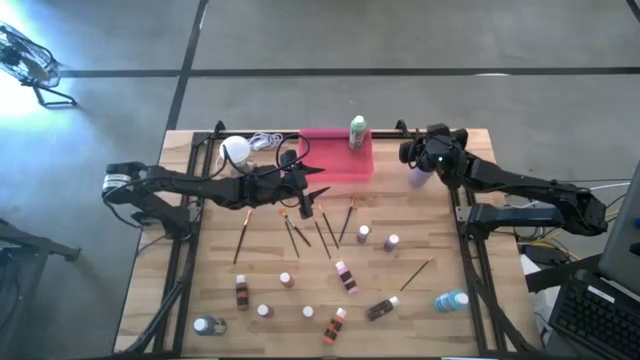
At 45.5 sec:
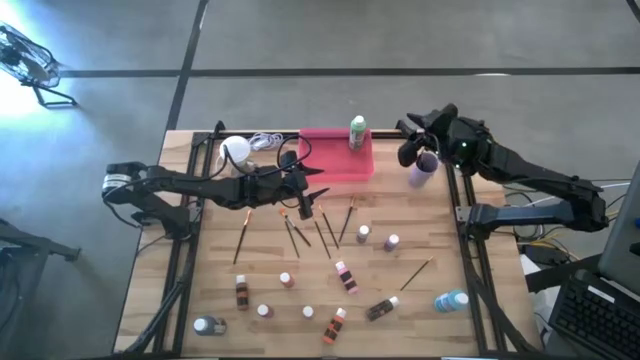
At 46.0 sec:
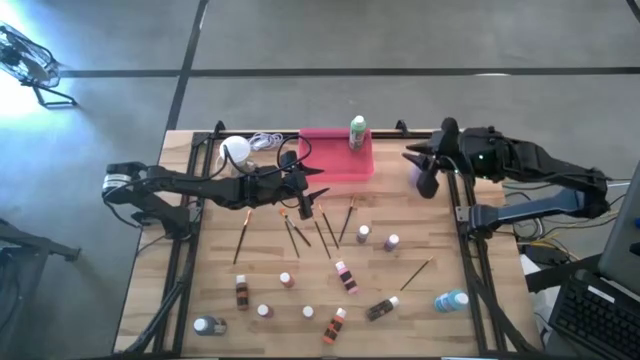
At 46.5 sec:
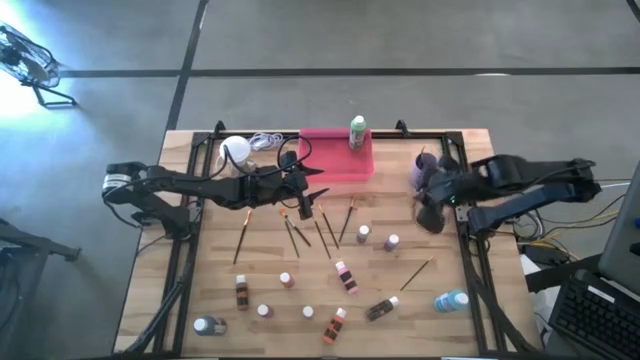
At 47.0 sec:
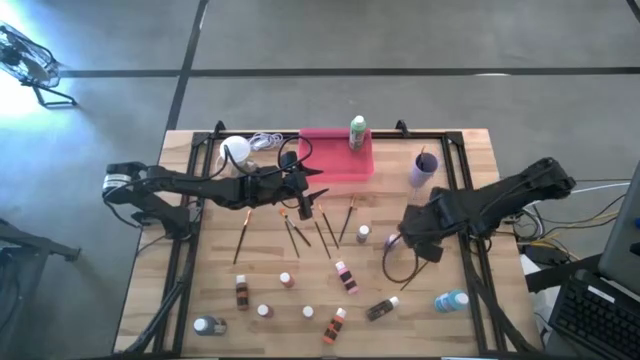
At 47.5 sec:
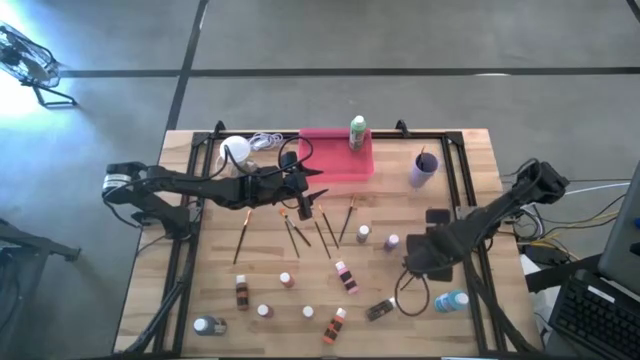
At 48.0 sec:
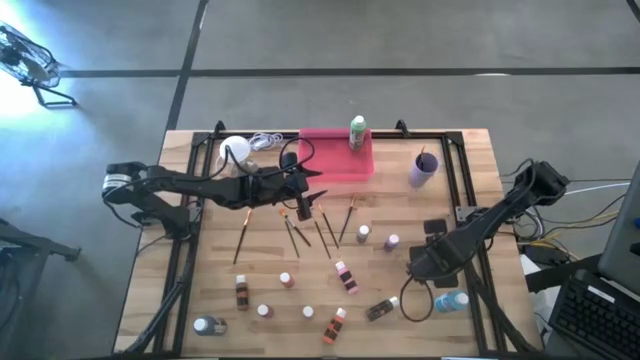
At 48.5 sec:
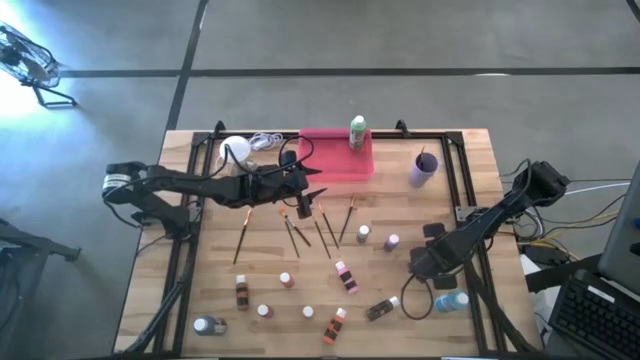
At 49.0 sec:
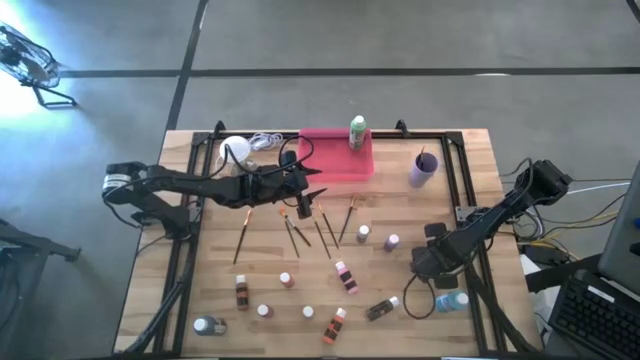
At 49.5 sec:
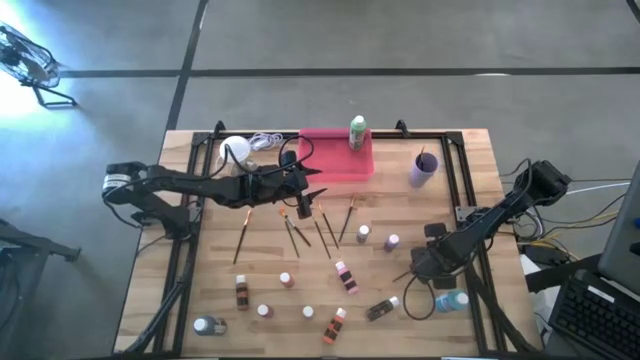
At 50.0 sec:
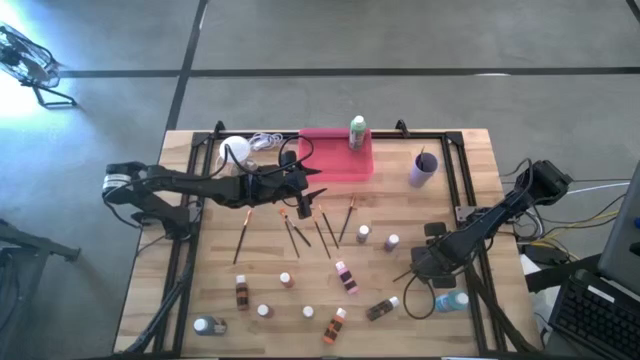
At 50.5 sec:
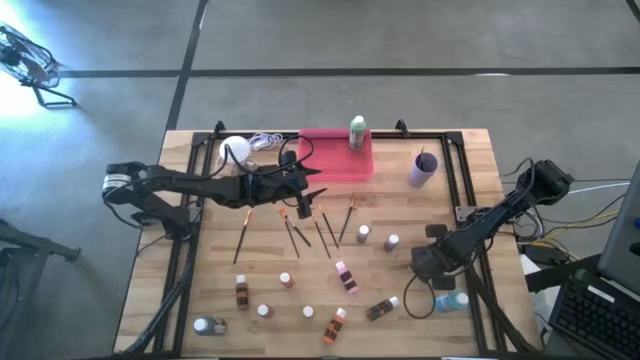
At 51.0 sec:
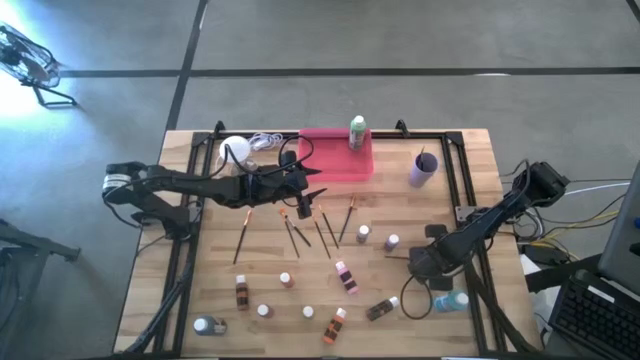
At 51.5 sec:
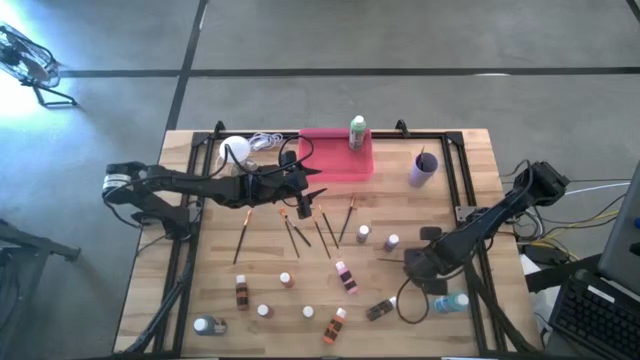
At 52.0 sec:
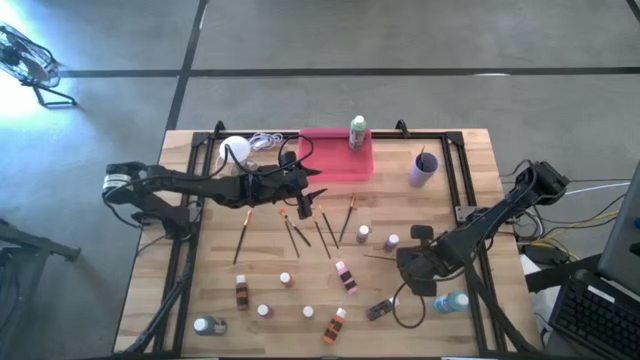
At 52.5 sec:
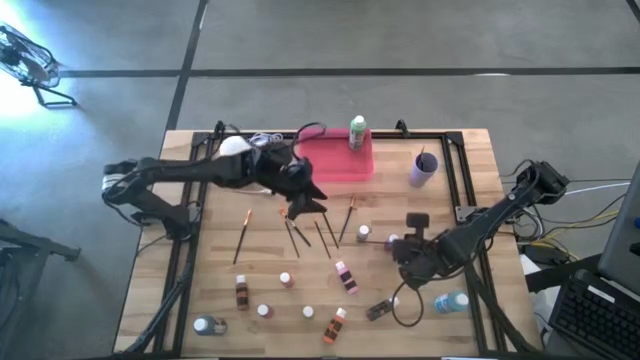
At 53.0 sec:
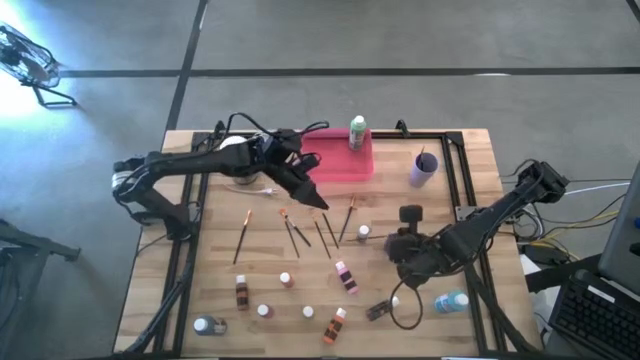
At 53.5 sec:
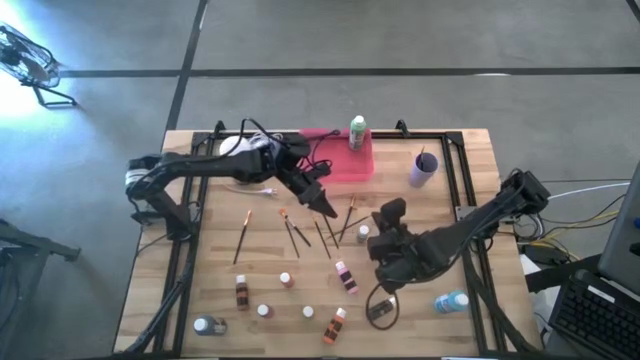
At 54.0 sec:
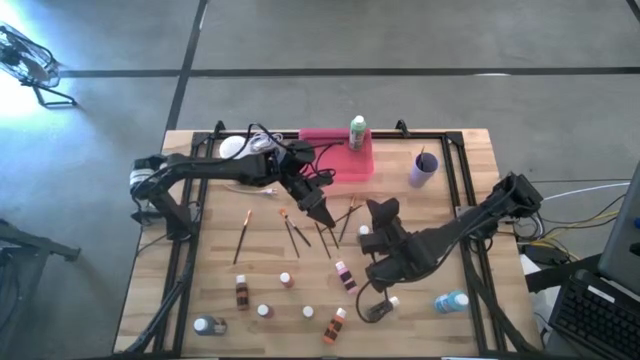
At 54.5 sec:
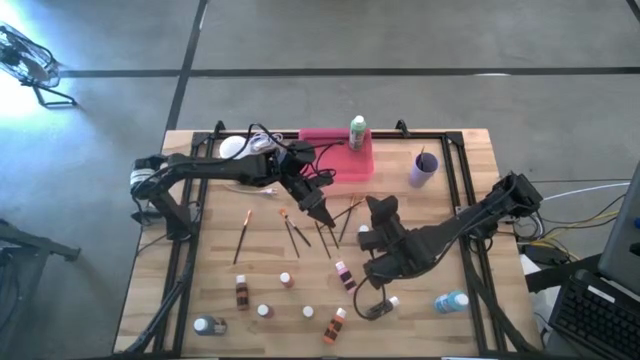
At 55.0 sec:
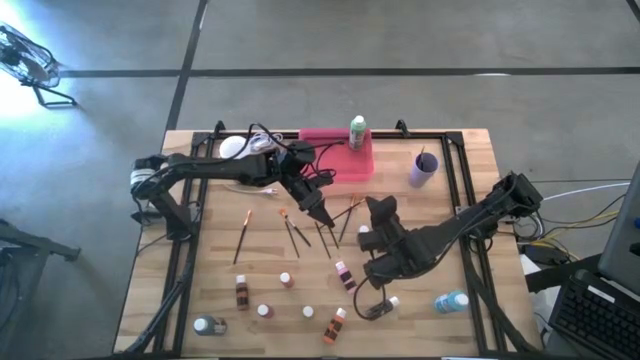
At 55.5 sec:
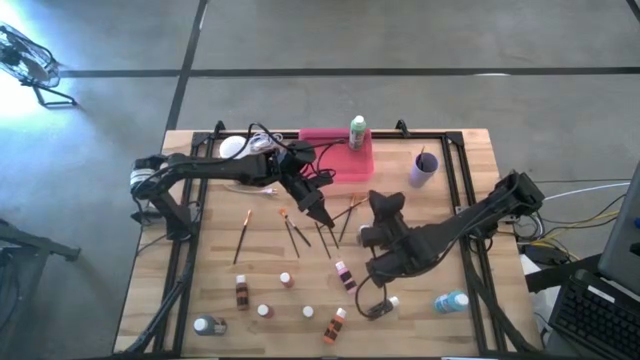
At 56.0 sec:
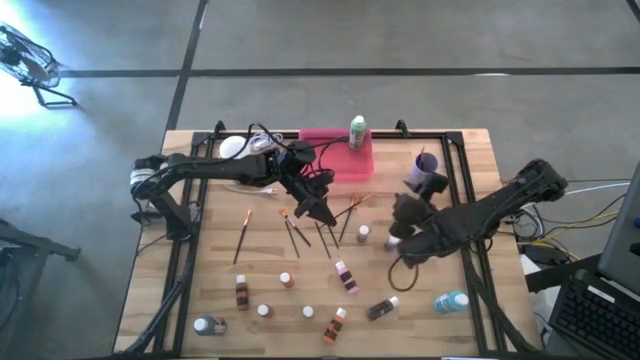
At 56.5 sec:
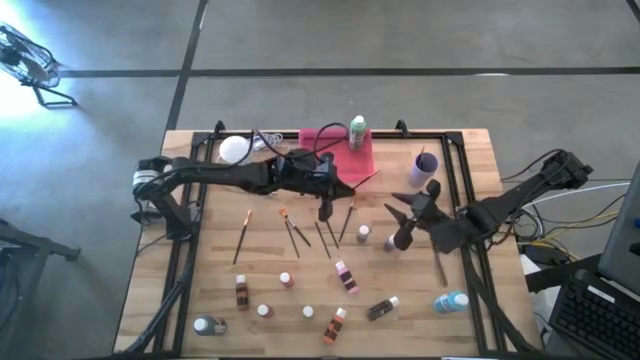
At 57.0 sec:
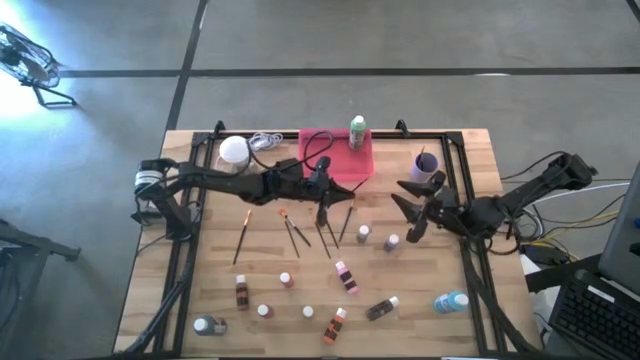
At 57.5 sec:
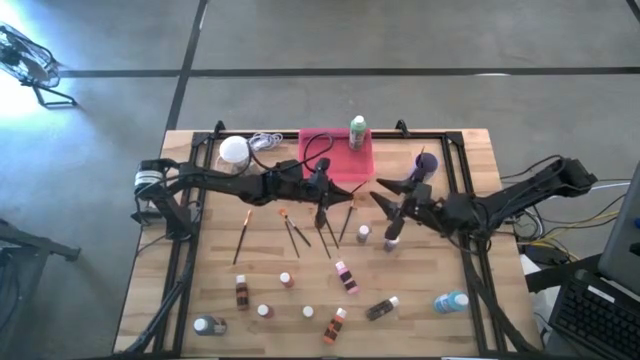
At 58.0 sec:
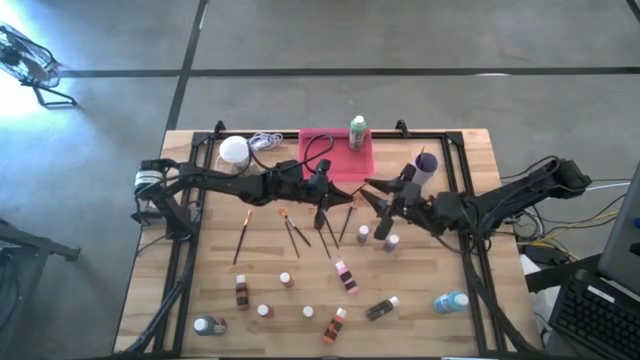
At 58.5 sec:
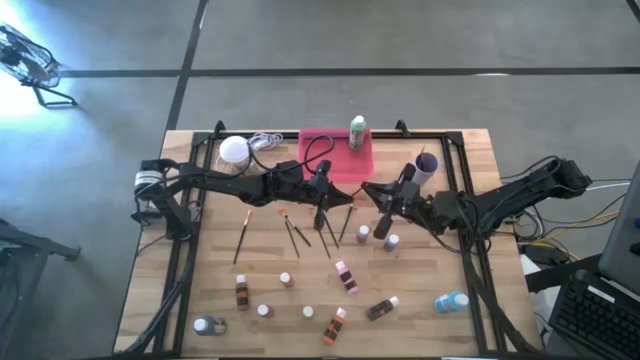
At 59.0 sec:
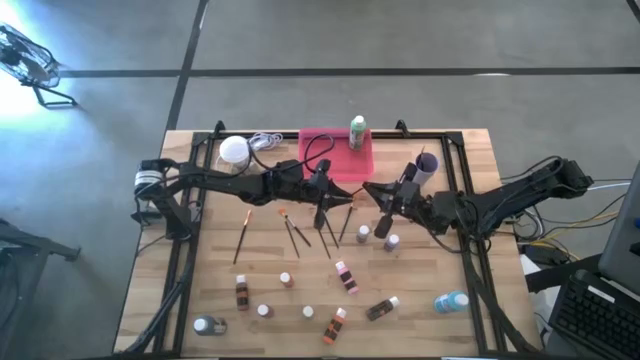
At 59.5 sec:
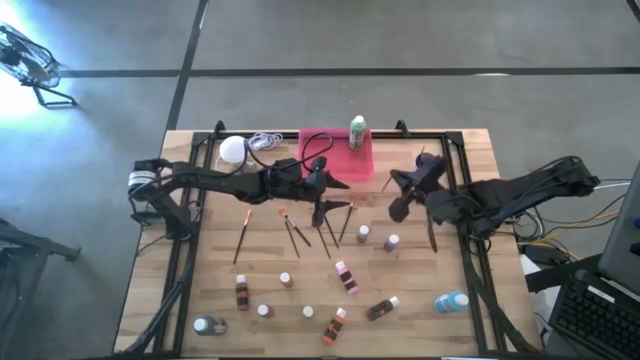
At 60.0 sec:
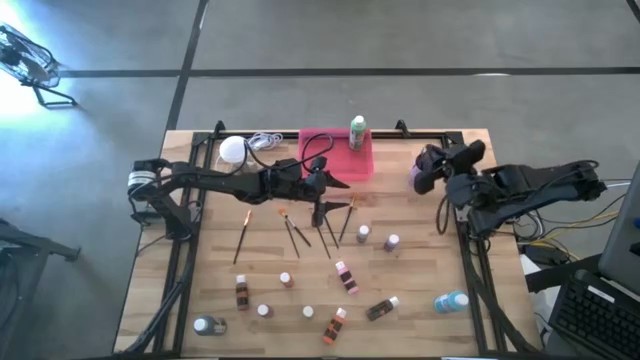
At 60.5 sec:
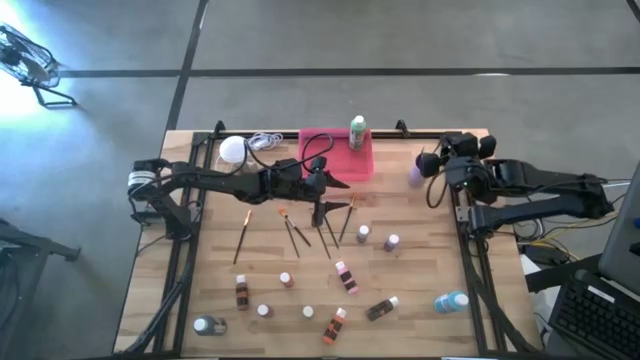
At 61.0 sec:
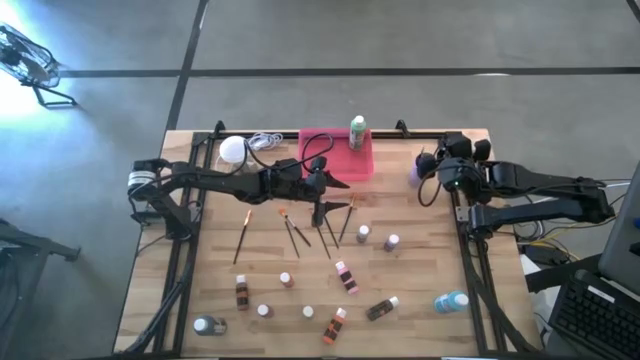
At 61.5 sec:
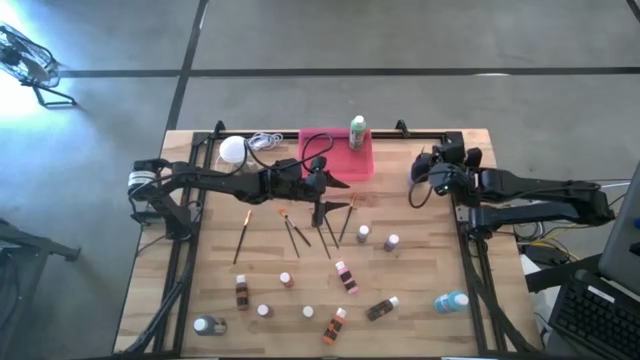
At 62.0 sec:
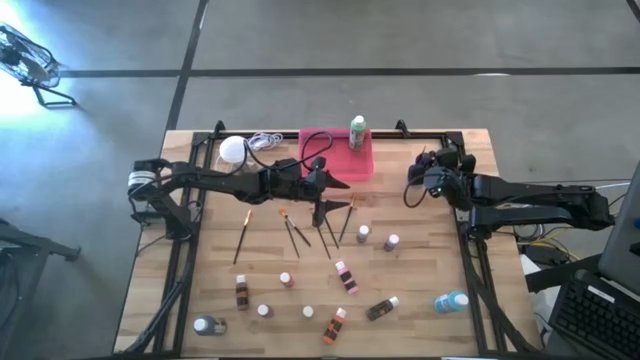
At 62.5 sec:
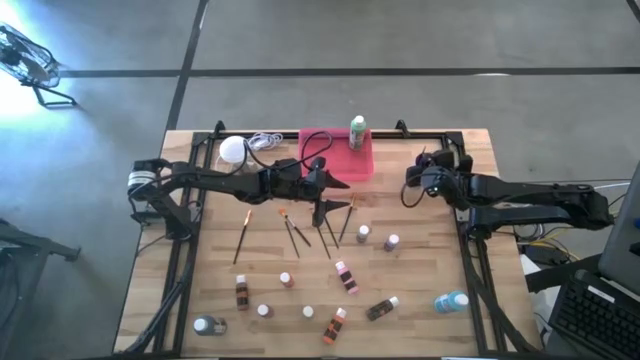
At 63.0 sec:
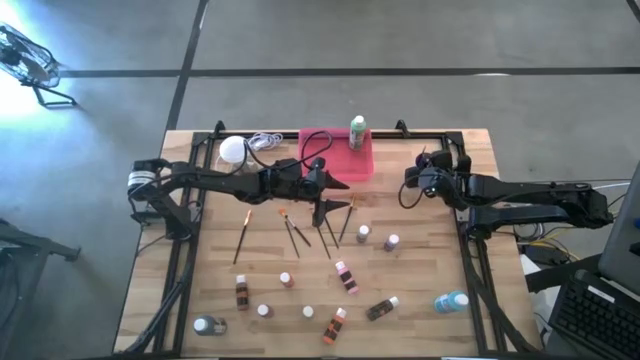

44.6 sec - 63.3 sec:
Task: Pick & Place Paint Supplies
Put the black gold paint brush into the violet cup

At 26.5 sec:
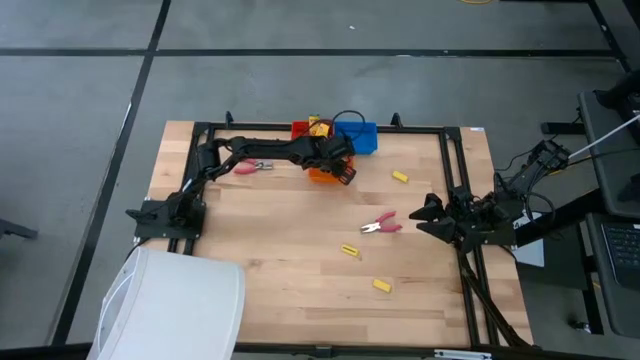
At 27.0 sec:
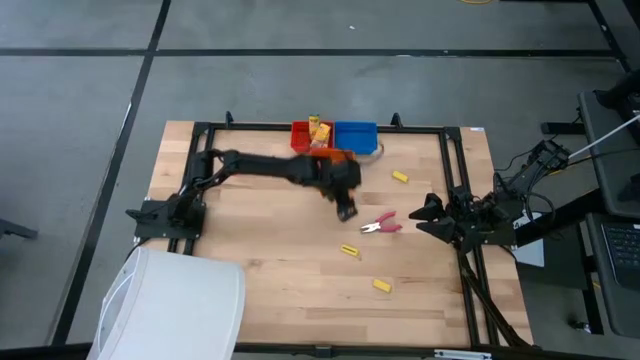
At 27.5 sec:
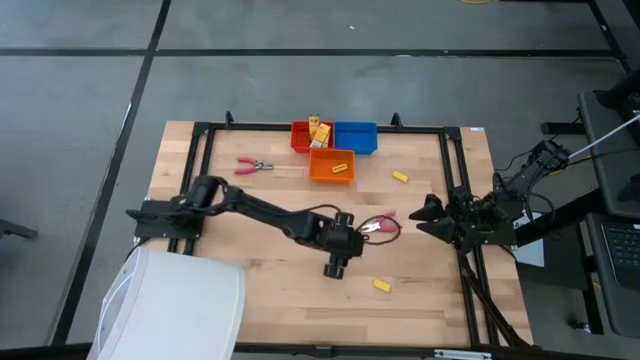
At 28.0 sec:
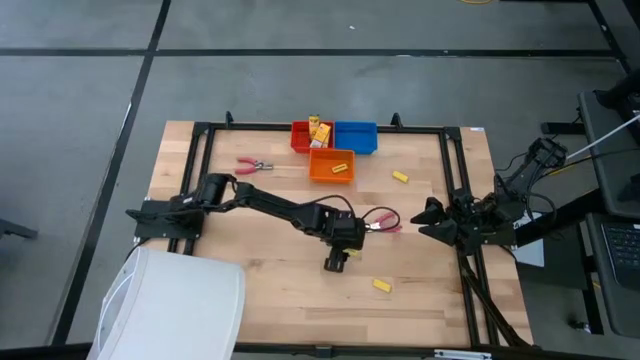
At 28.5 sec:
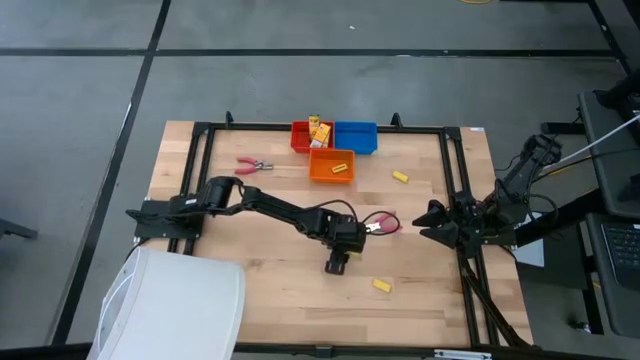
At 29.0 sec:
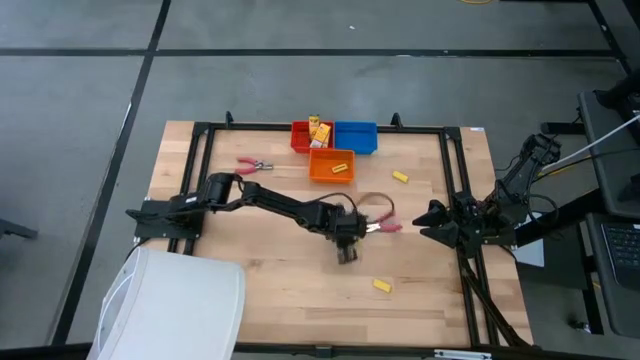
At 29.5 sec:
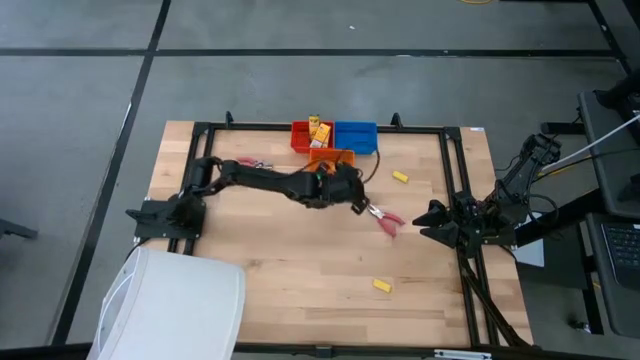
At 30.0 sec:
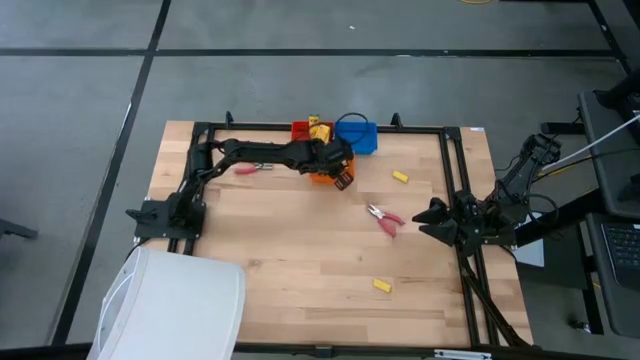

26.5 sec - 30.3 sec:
Task: Pick & Place School Supplies
Put the yellow eraser into the orange bin
